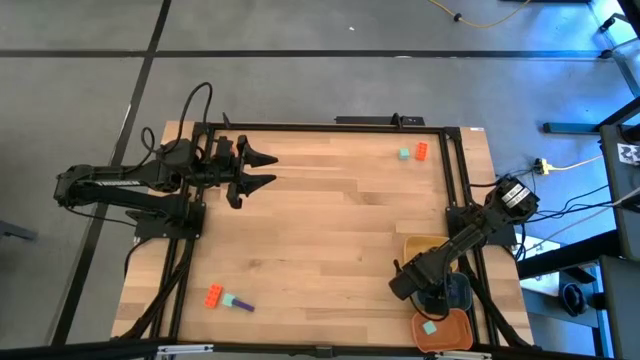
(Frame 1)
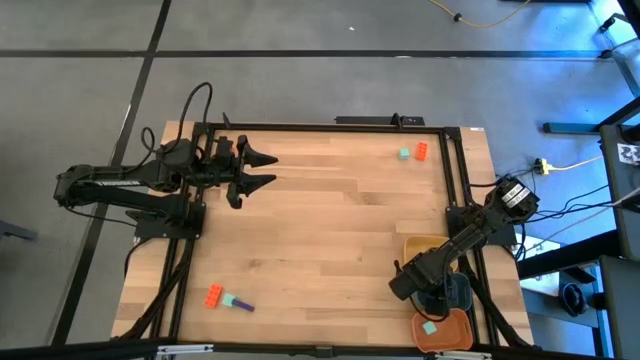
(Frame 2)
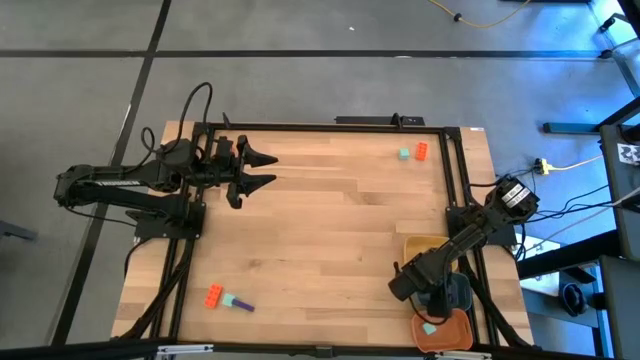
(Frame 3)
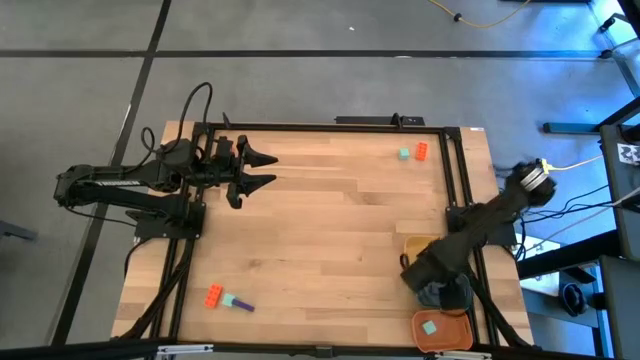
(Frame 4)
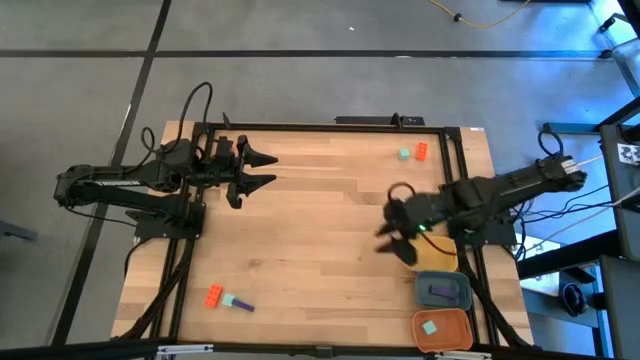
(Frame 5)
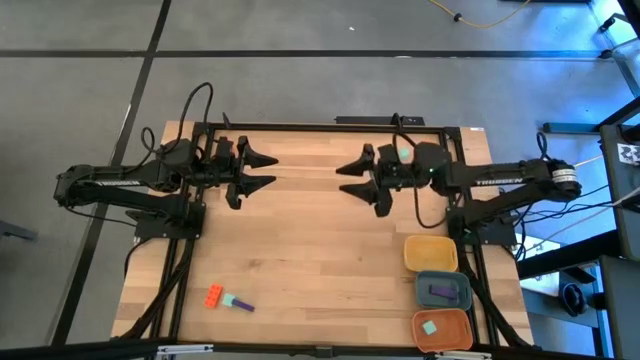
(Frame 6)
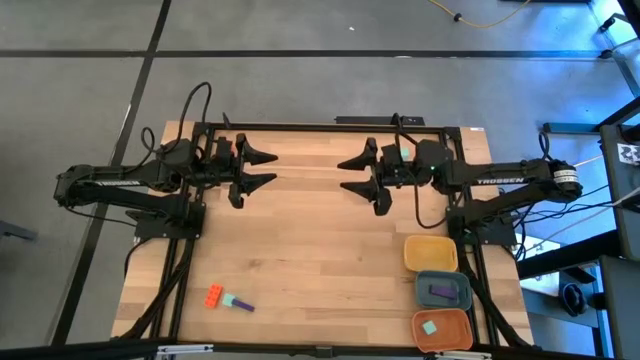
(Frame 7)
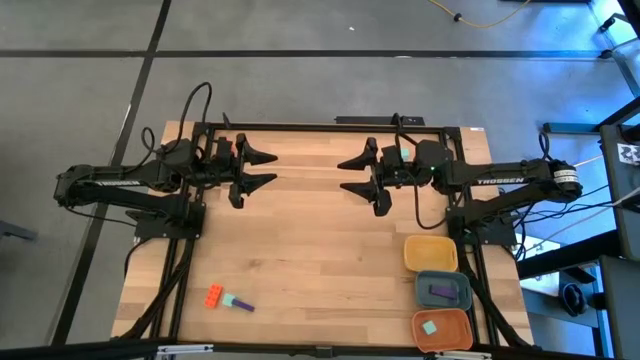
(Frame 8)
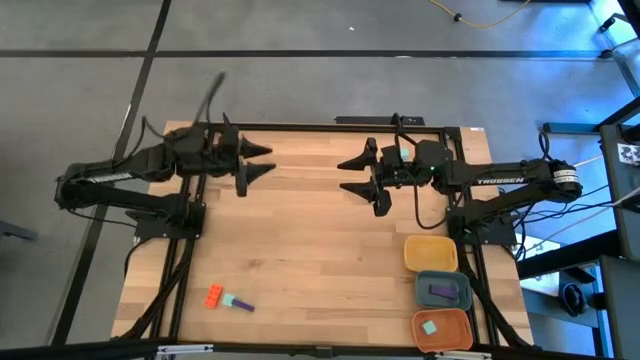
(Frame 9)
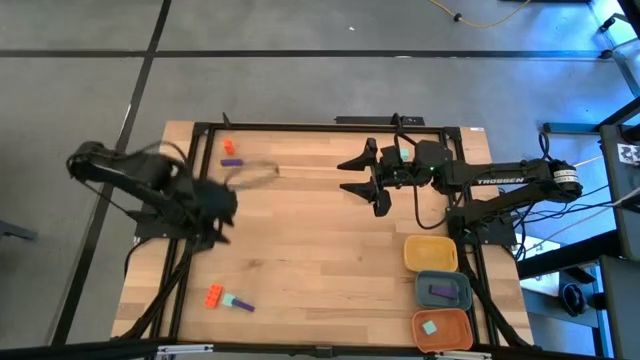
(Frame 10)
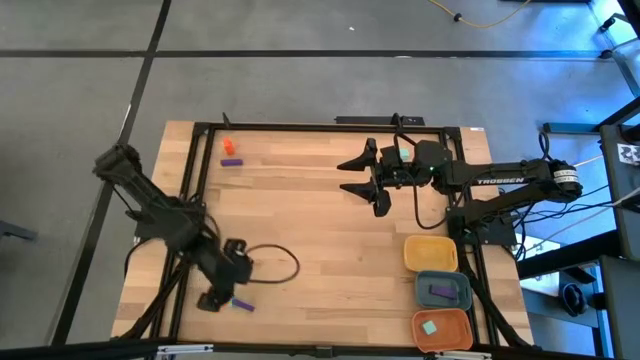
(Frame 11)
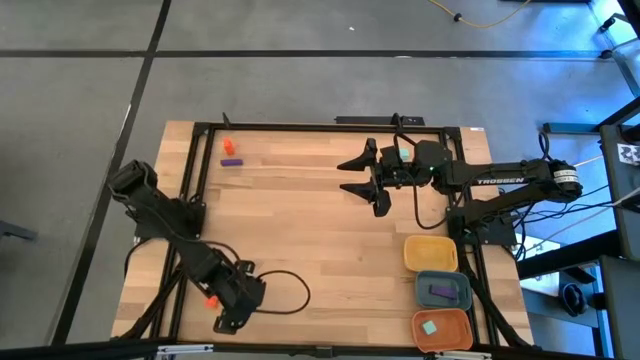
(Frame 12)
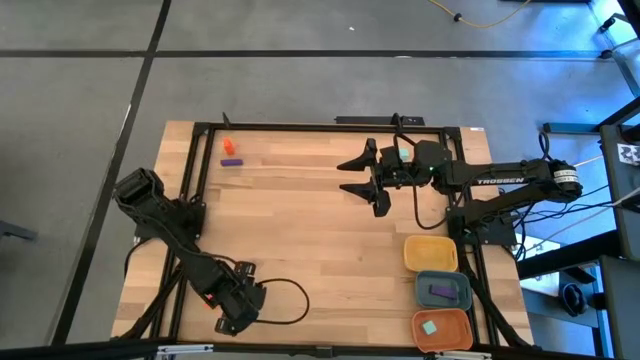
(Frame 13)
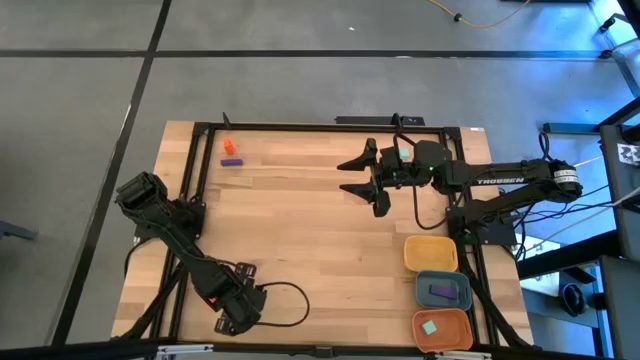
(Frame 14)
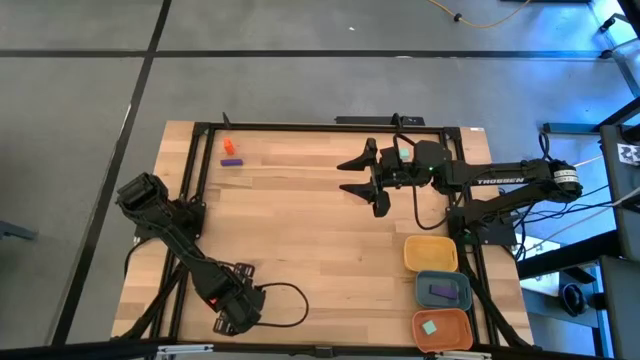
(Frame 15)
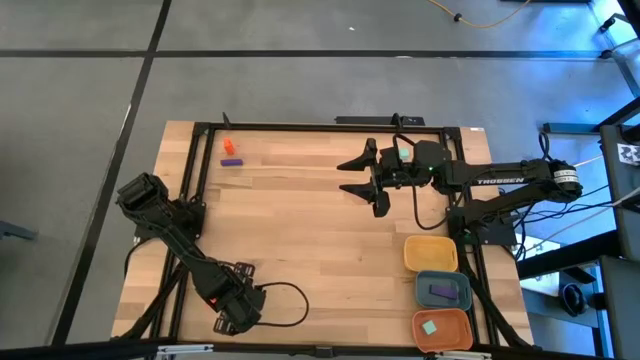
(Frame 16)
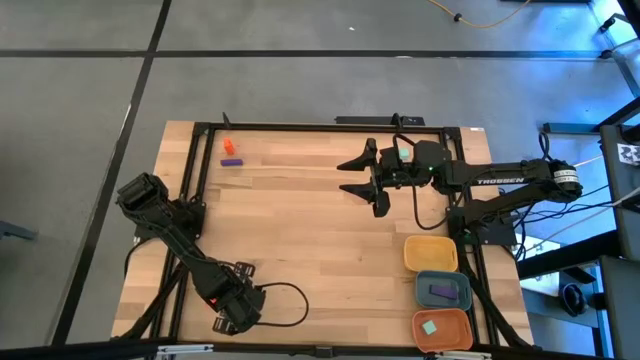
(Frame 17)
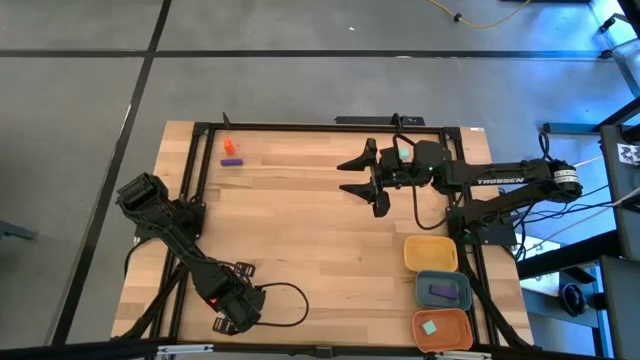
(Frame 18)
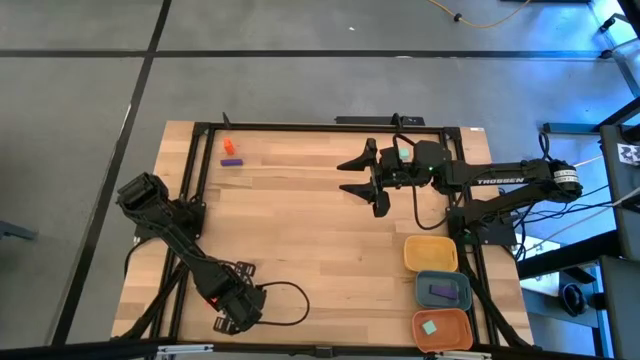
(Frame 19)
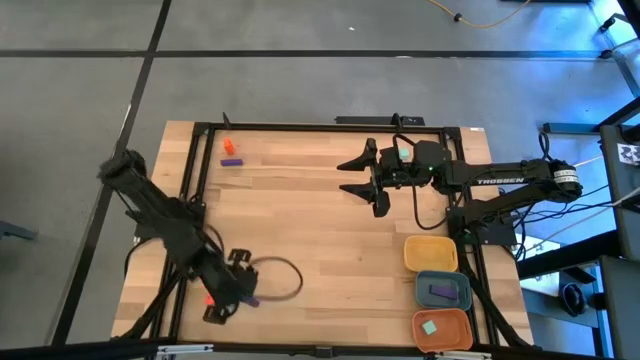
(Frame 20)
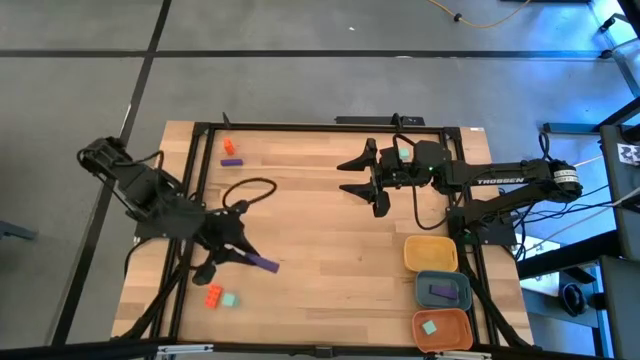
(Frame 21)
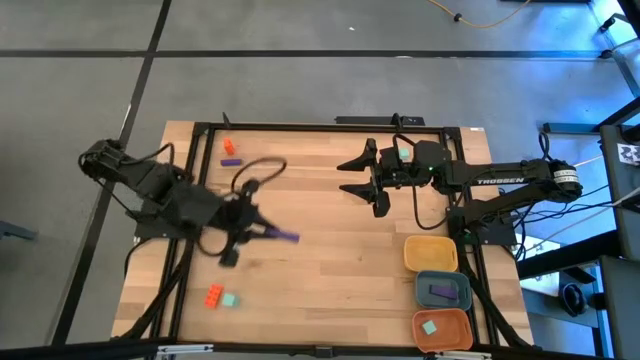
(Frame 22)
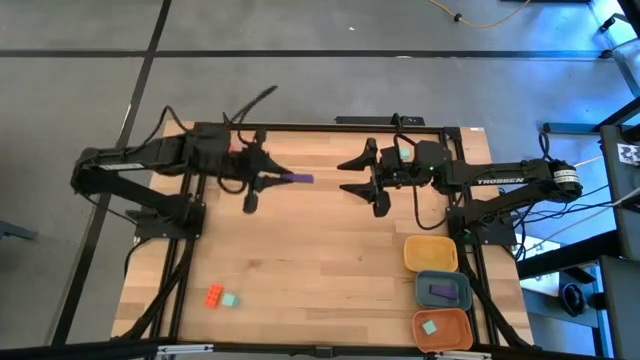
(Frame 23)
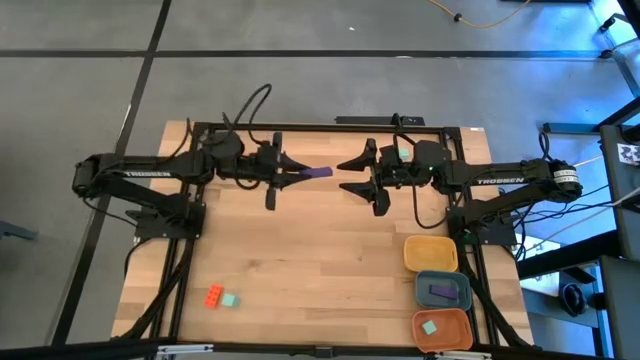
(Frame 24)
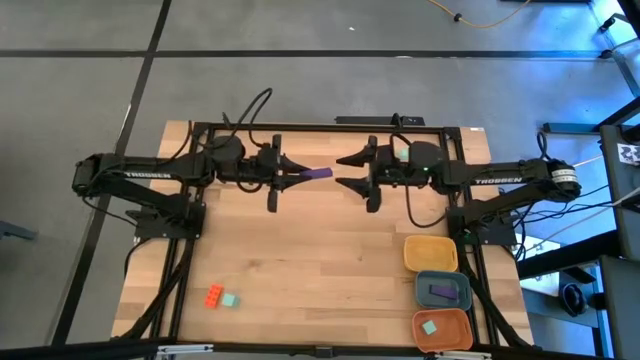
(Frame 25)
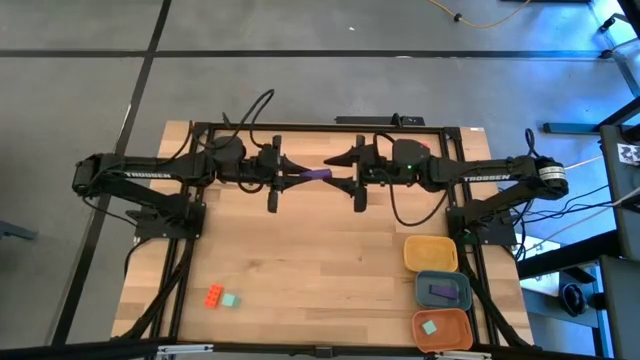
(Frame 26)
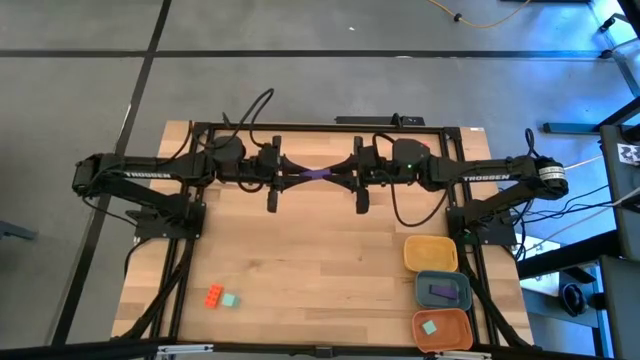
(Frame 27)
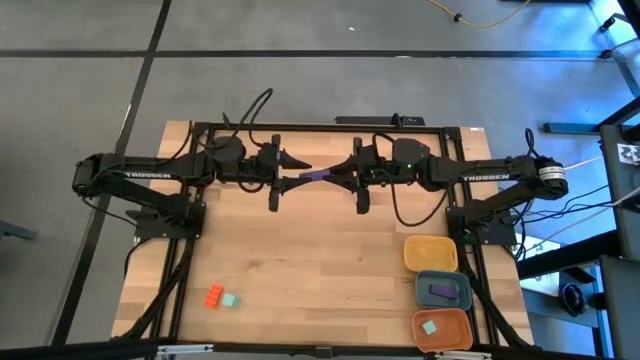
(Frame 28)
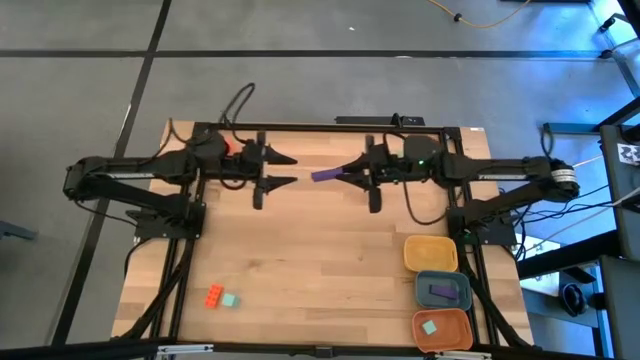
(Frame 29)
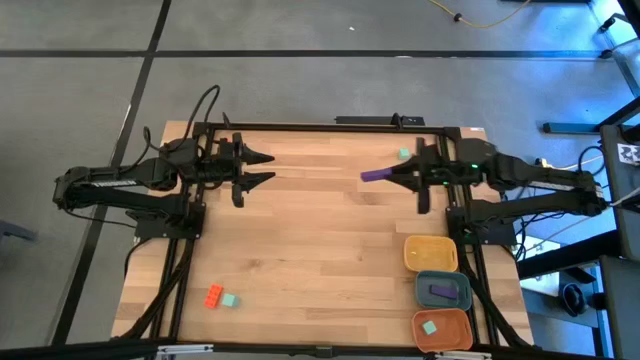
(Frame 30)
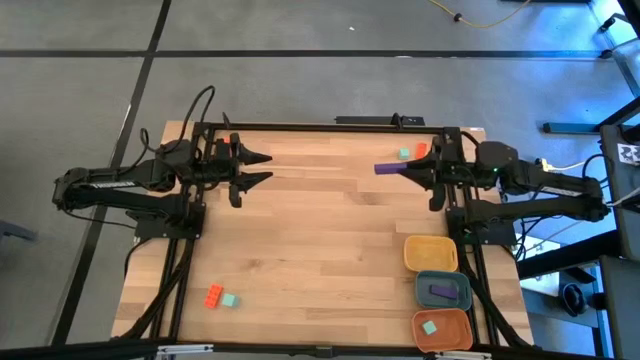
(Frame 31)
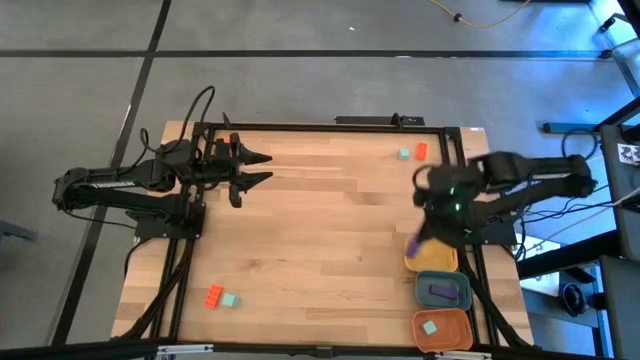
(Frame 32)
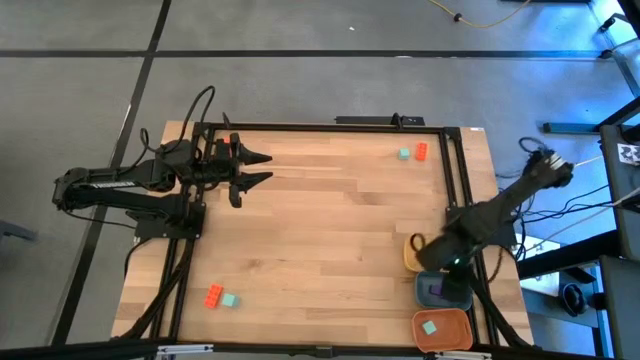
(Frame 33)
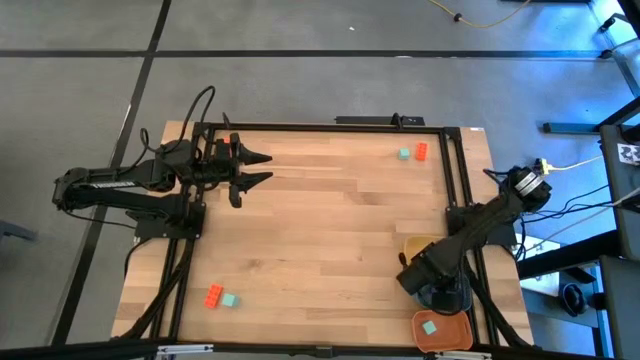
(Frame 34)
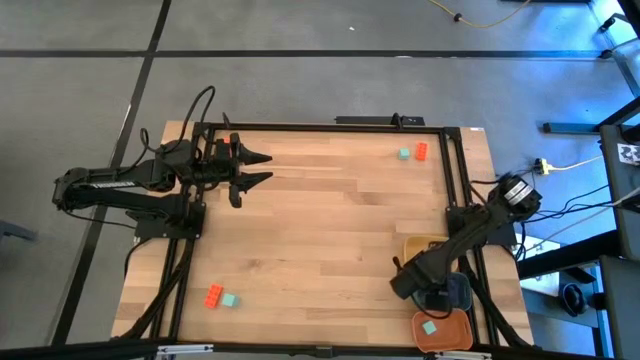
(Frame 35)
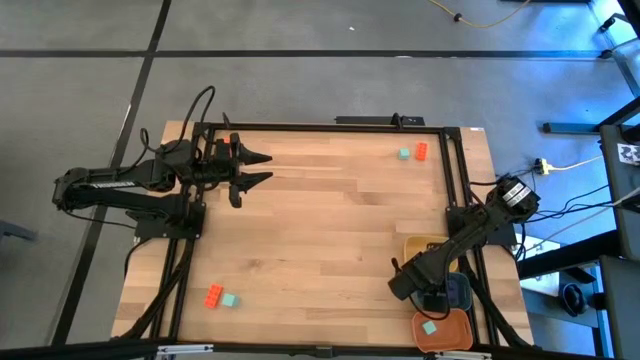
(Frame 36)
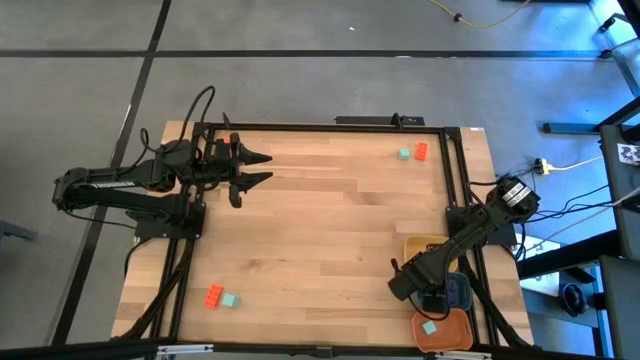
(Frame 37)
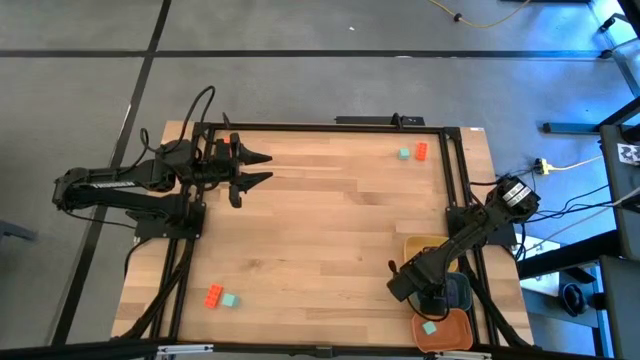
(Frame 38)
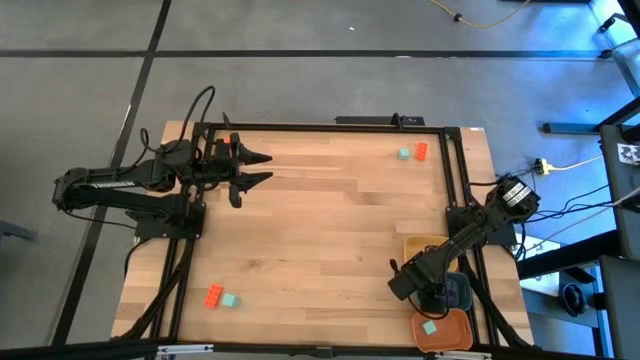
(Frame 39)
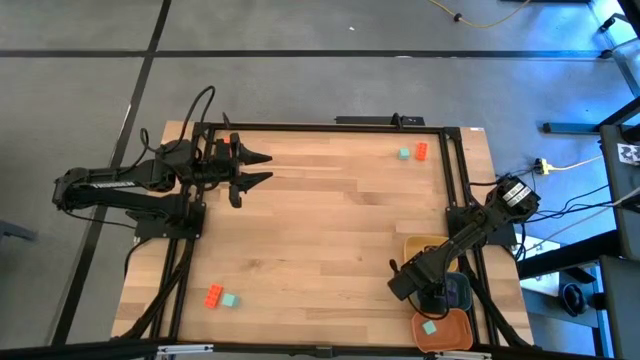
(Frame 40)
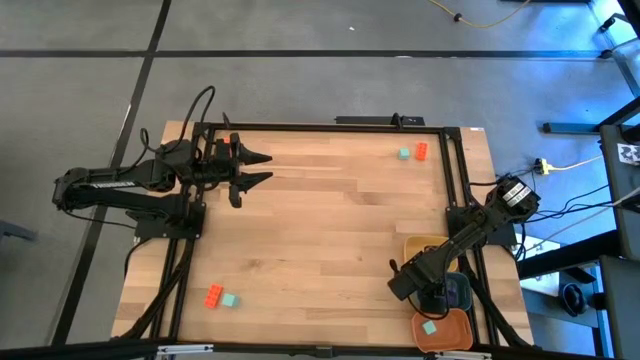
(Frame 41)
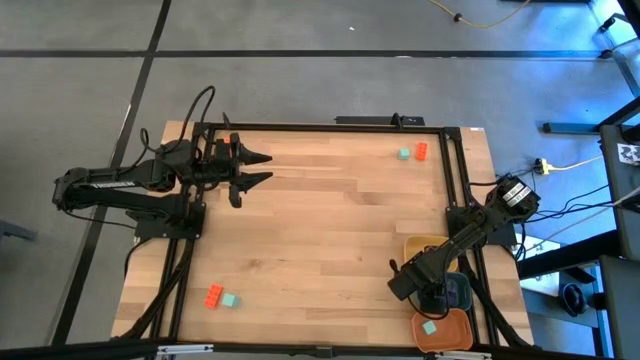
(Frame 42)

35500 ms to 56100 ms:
Task: Sort & place blocks by color
Put the bottom violet block into the blue bin

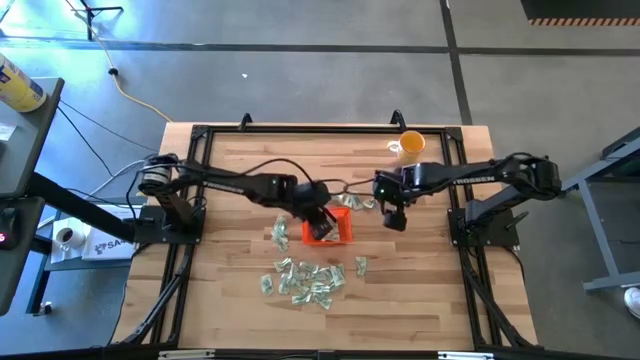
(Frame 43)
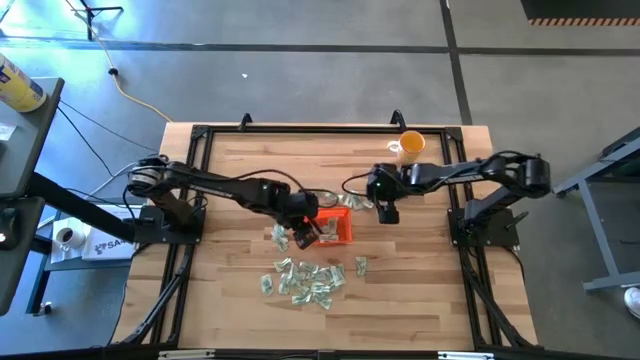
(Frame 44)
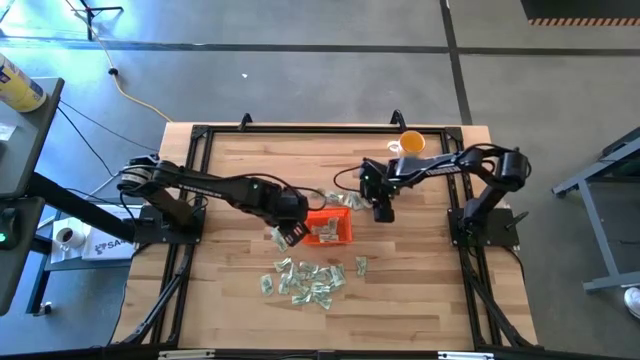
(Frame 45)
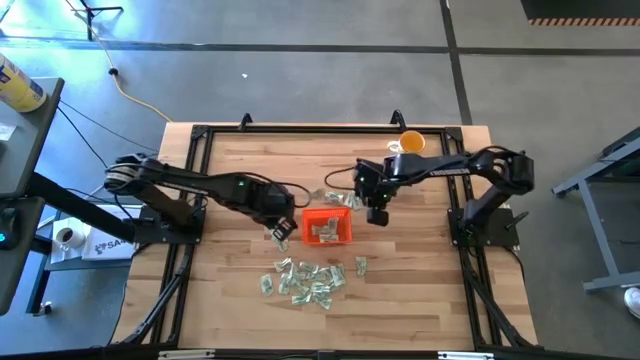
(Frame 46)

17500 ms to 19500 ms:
Task: Pick and place Stevia / Truvia into bins
Put the stevia packet into the orange bin
